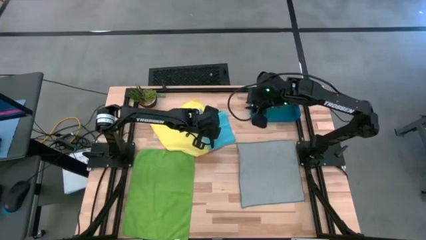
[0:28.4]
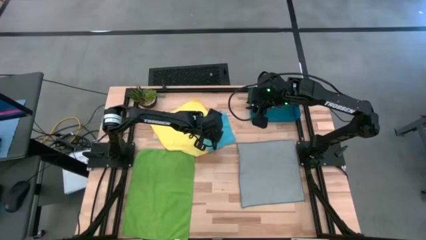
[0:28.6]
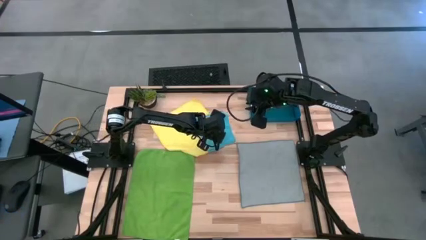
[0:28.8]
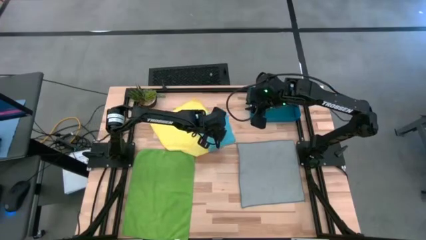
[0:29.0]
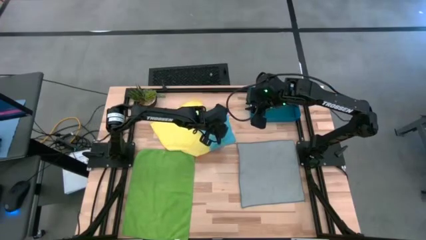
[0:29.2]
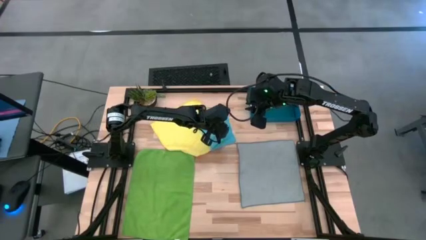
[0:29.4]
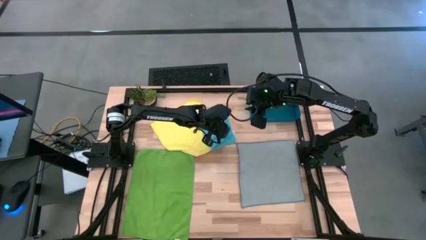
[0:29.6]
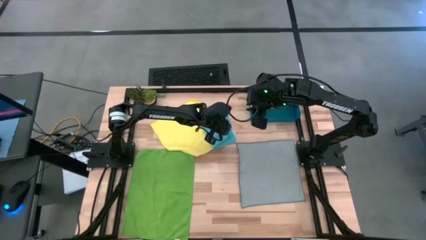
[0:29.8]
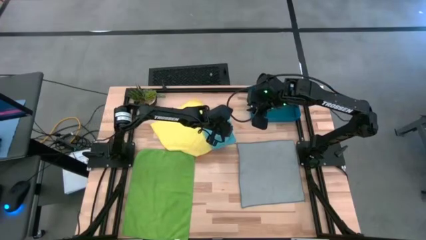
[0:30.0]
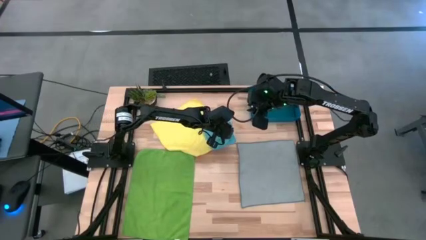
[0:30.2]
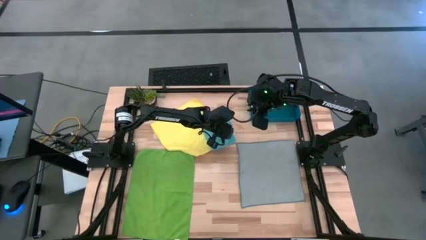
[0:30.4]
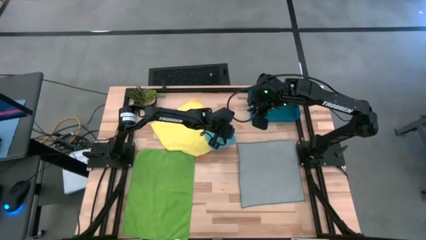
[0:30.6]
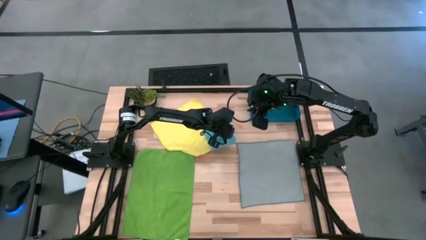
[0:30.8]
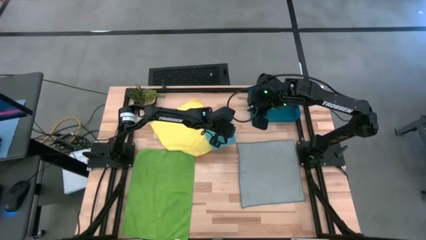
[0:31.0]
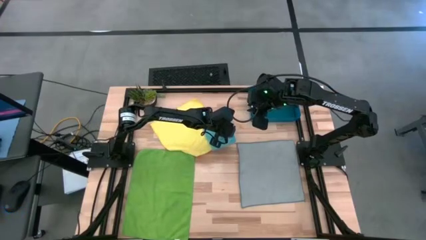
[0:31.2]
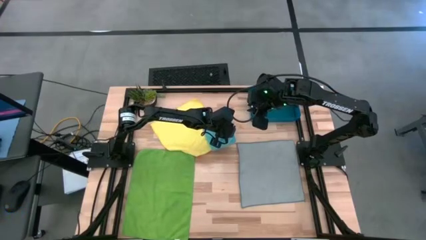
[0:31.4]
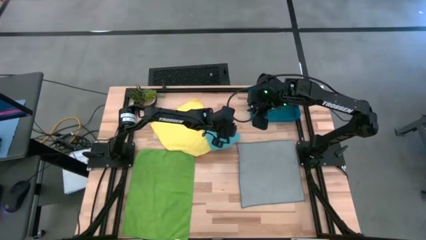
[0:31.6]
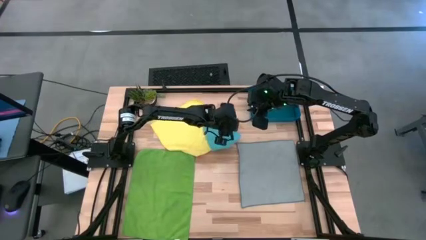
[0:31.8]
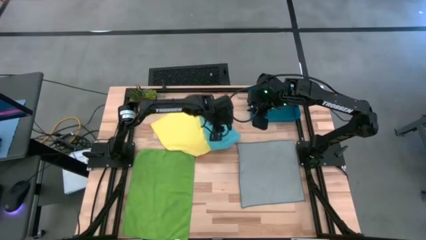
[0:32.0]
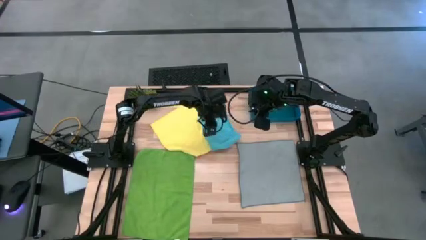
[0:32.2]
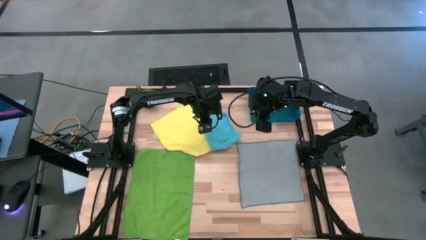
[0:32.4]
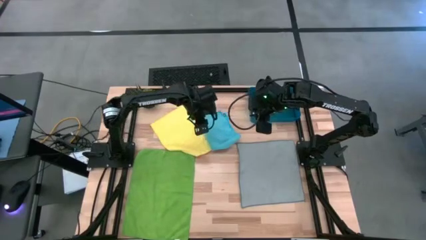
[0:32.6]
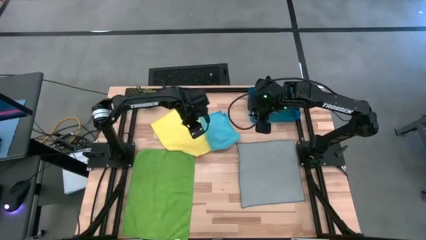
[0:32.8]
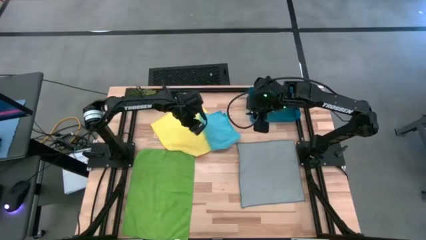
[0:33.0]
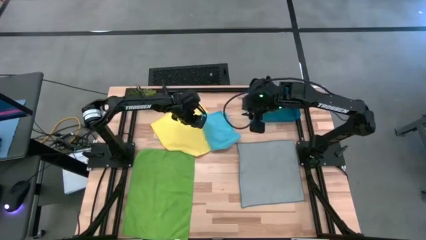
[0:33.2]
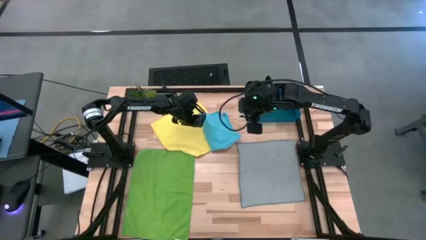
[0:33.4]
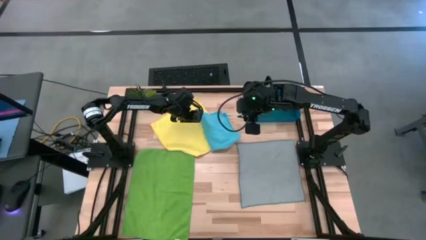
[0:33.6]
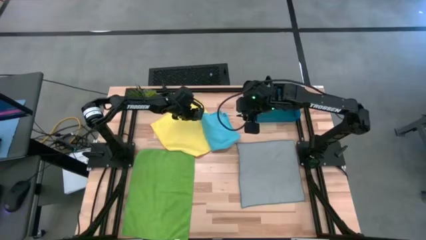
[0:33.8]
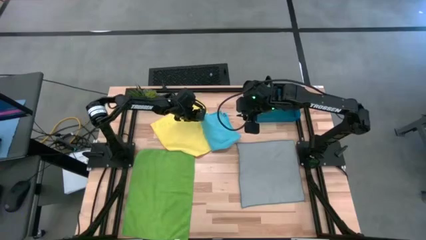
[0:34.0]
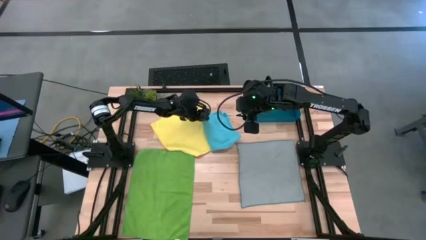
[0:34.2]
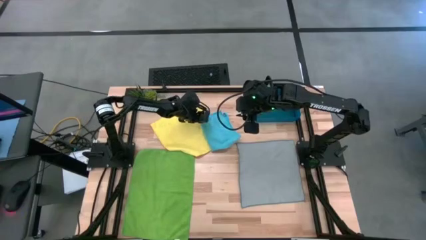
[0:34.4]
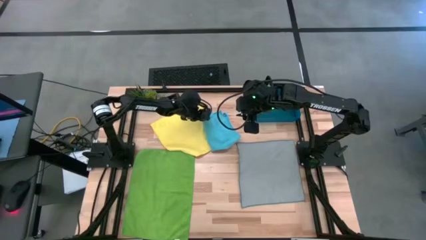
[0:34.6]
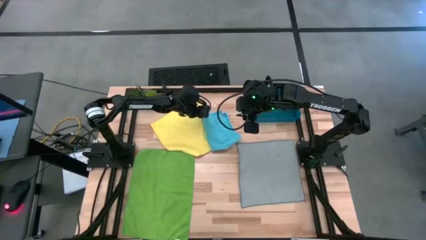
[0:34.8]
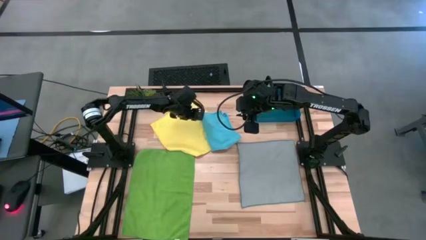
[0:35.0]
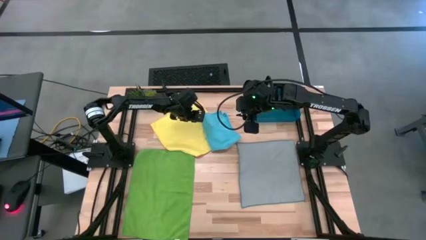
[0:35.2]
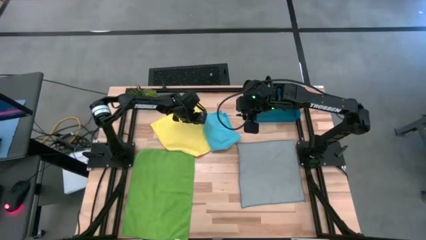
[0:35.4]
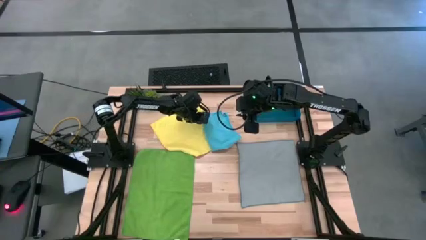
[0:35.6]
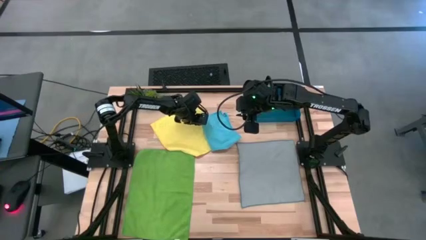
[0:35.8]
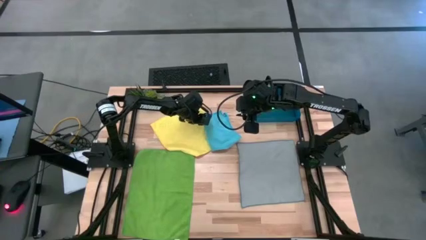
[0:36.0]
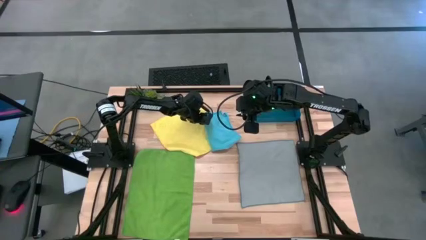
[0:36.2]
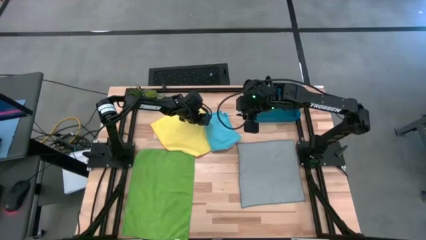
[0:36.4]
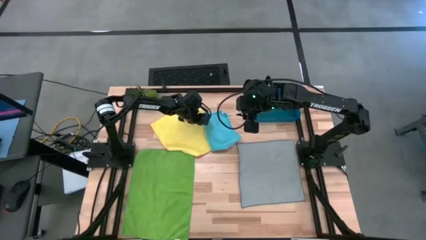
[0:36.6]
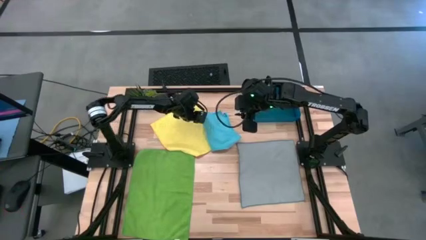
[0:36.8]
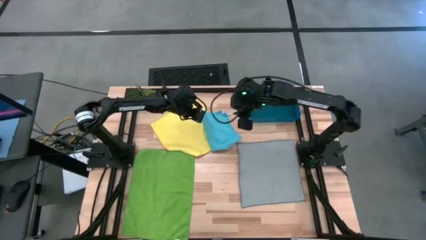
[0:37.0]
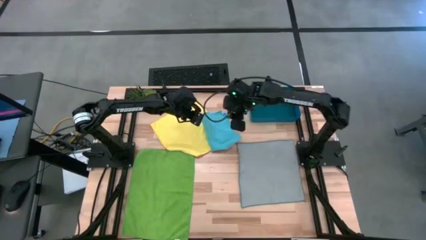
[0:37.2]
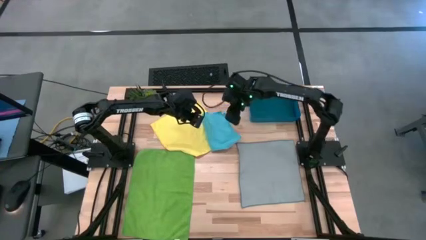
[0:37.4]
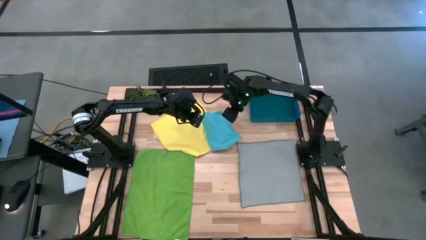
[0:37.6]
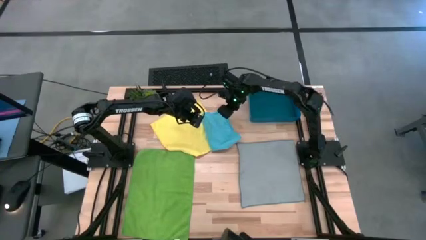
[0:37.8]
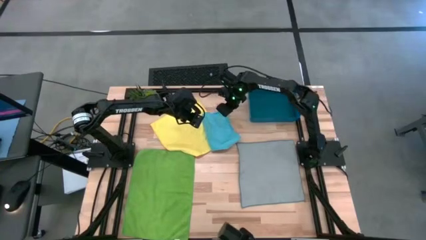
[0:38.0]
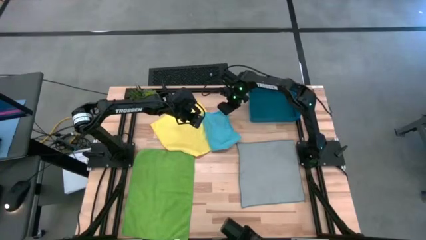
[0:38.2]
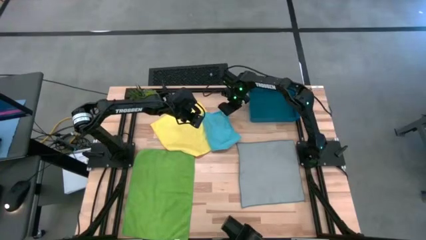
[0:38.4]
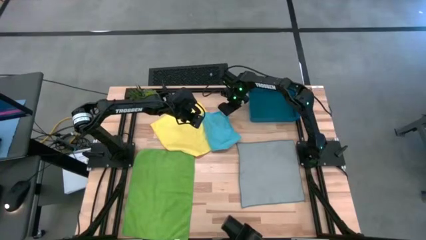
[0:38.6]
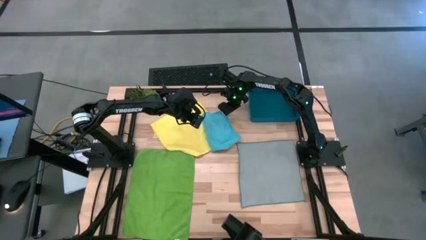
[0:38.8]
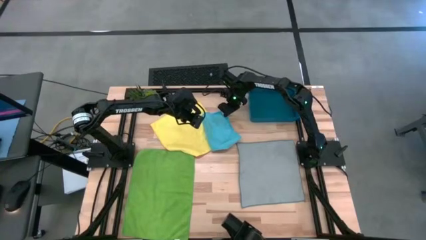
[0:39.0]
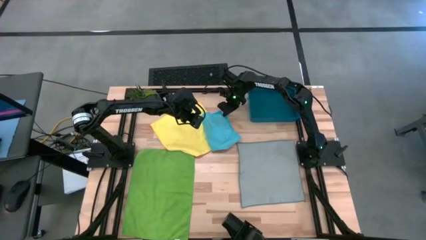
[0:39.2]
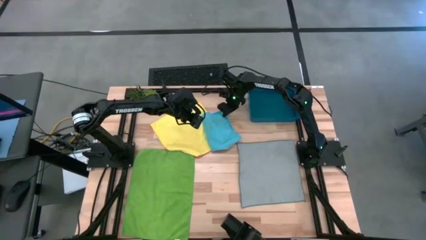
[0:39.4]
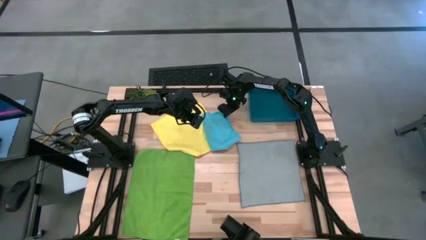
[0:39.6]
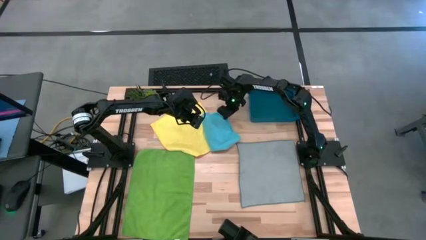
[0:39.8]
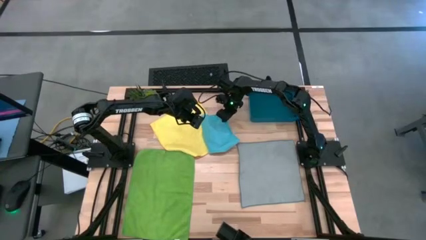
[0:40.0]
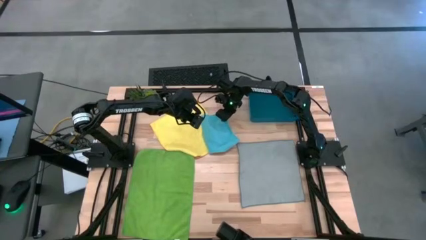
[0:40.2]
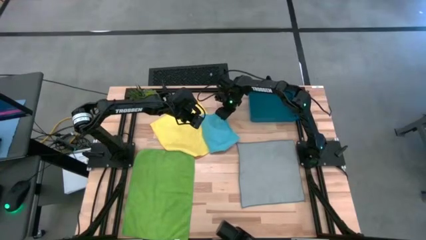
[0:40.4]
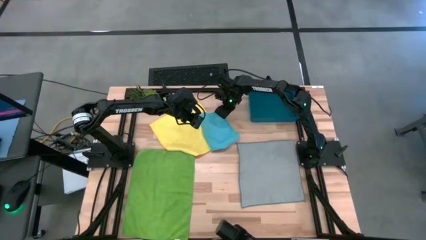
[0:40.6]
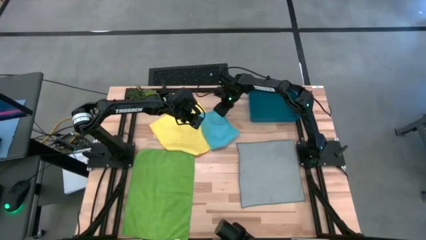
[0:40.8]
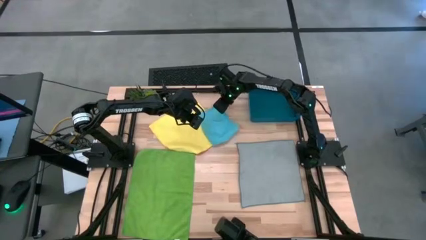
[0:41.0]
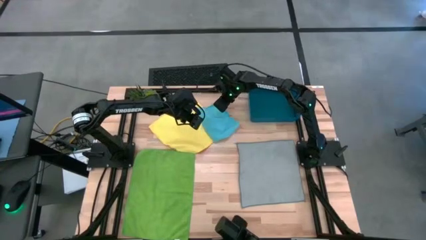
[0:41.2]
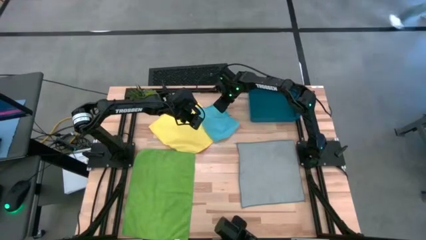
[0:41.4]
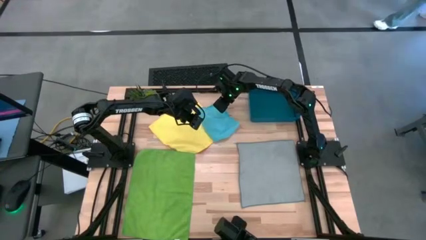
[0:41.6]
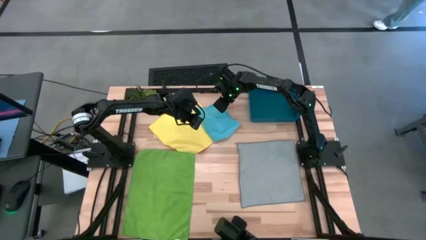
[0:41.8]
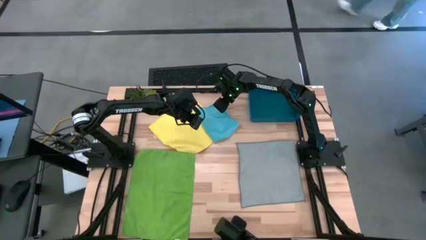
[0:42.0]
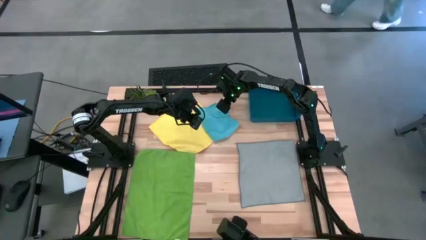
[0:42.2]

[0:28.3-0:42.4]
Task: Fold microfiber towels
Fold the blue microfiber cloth
